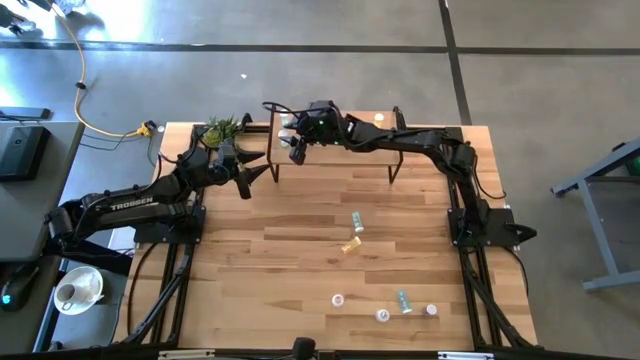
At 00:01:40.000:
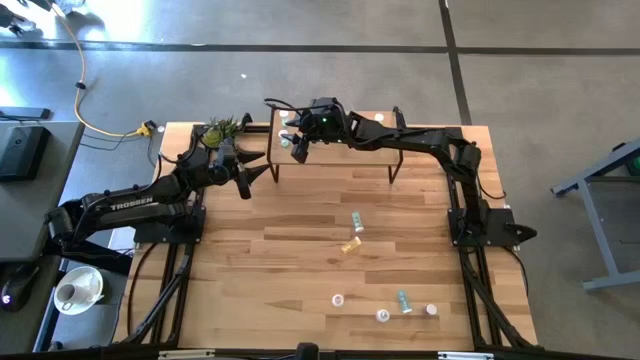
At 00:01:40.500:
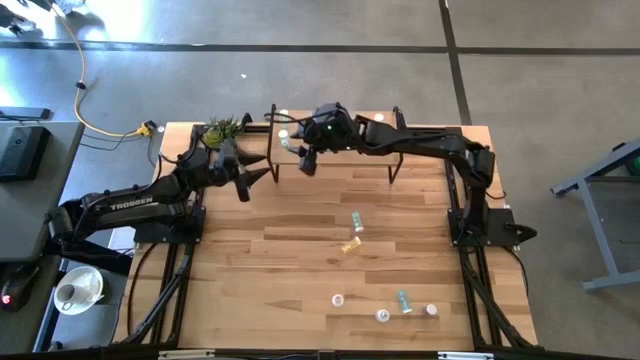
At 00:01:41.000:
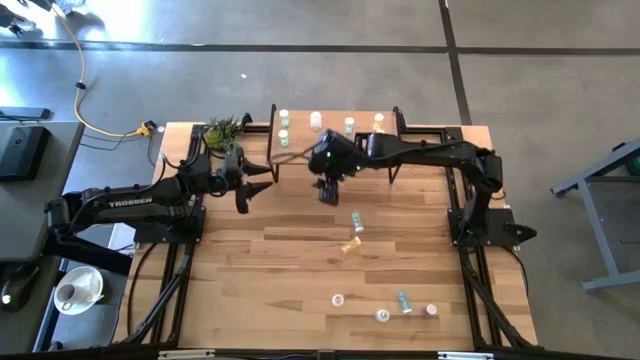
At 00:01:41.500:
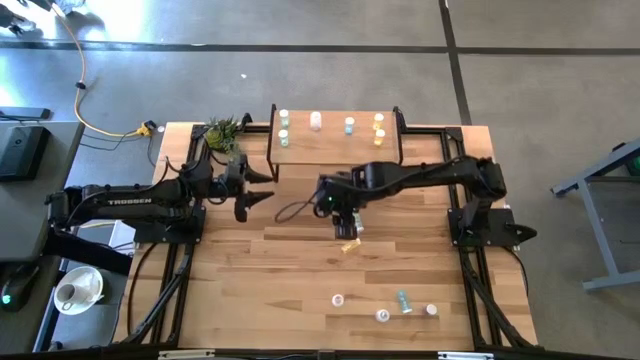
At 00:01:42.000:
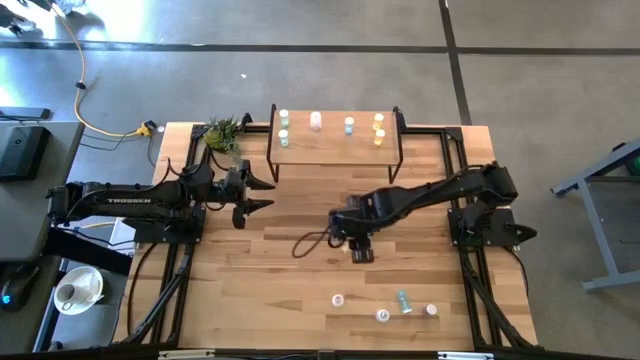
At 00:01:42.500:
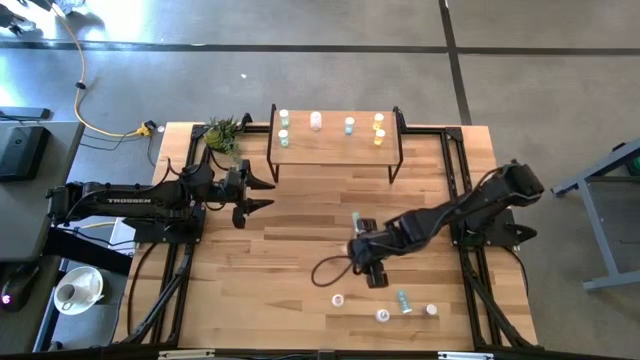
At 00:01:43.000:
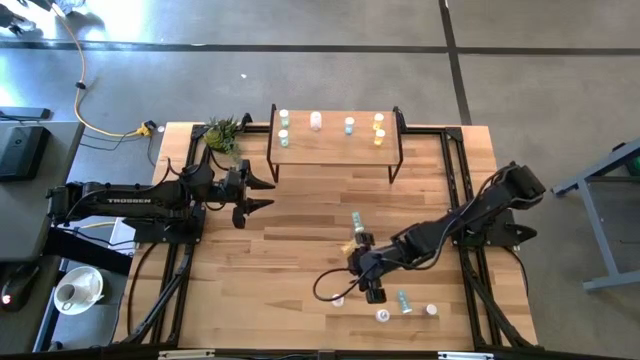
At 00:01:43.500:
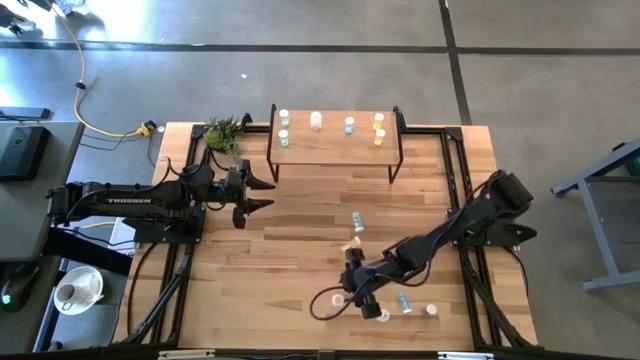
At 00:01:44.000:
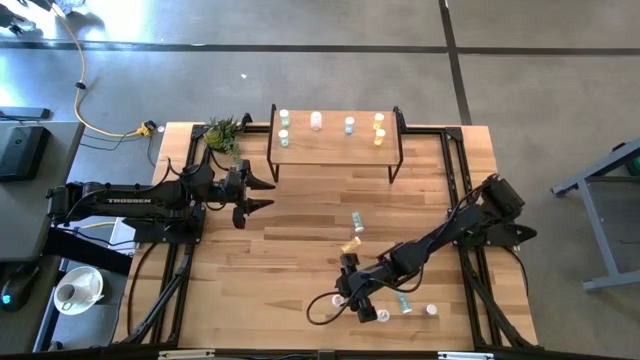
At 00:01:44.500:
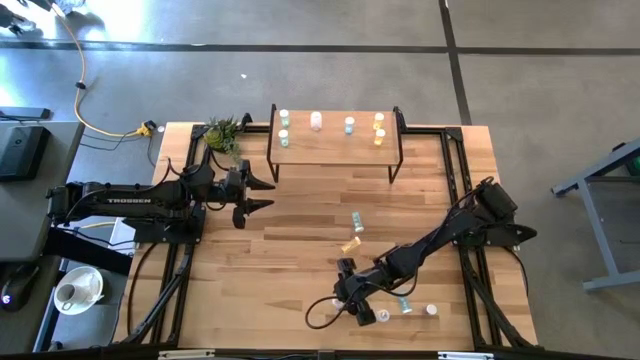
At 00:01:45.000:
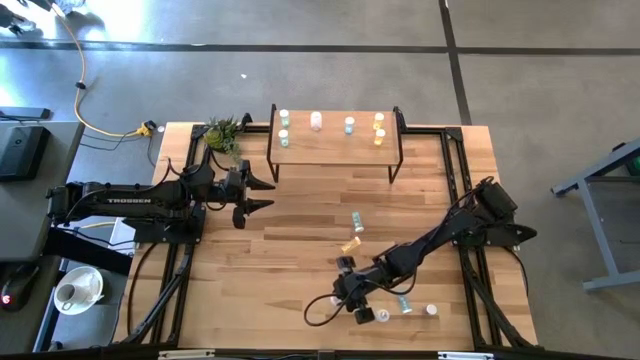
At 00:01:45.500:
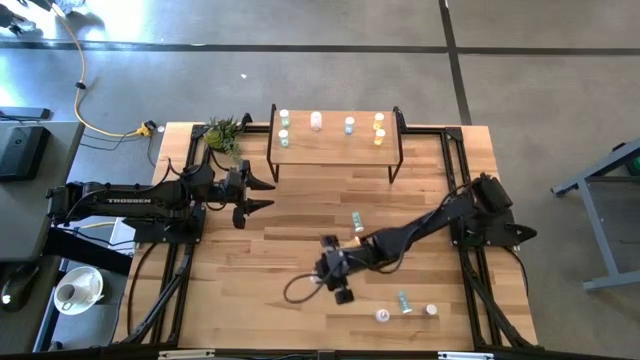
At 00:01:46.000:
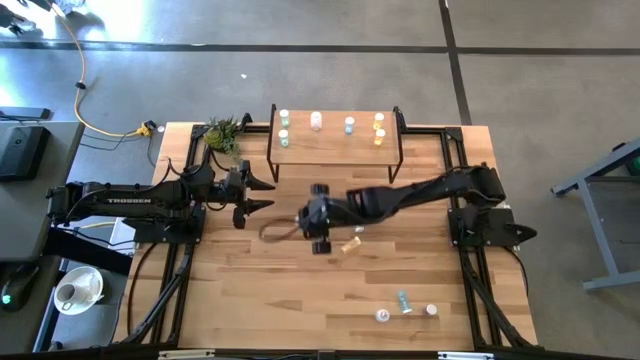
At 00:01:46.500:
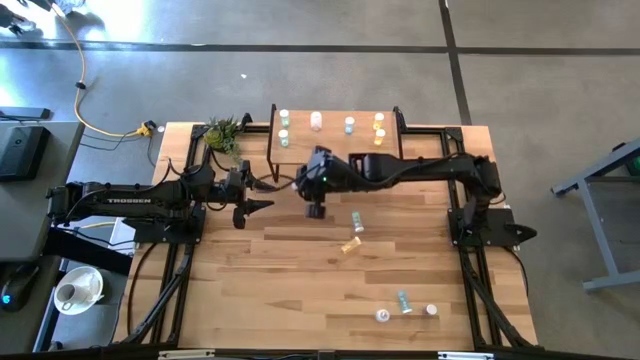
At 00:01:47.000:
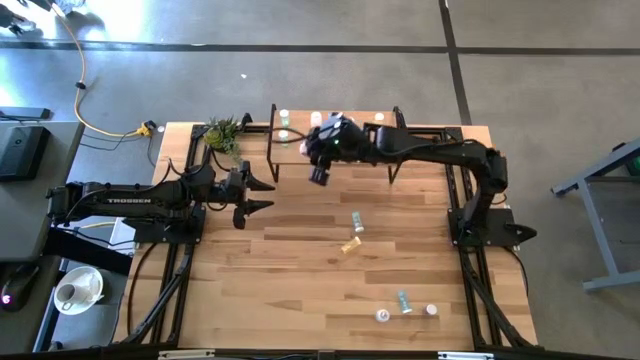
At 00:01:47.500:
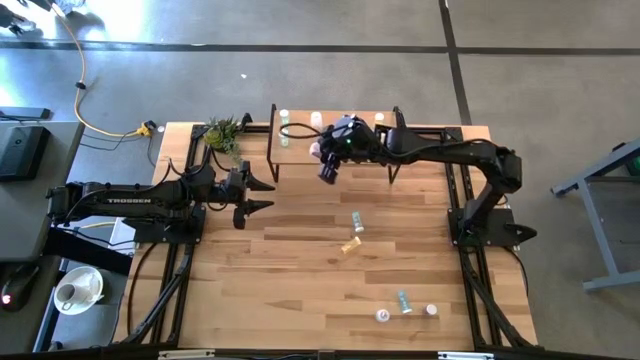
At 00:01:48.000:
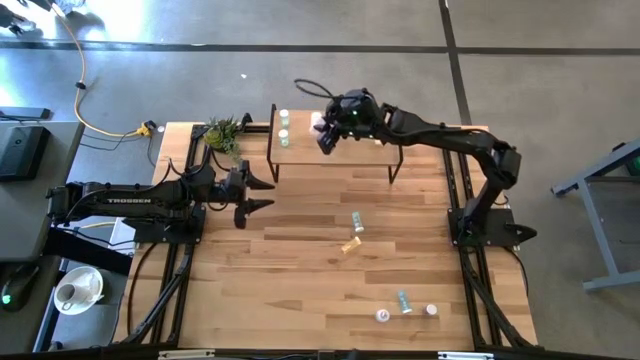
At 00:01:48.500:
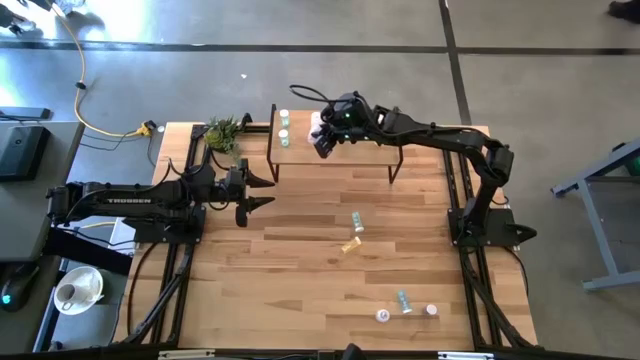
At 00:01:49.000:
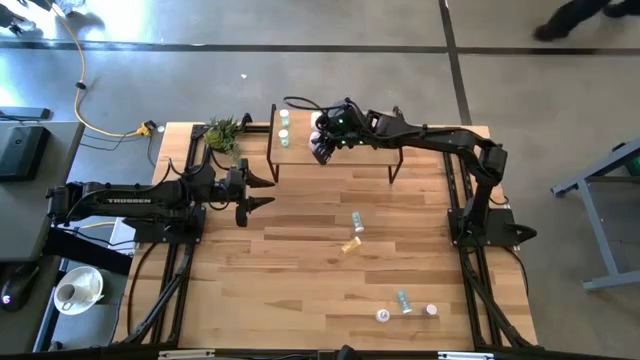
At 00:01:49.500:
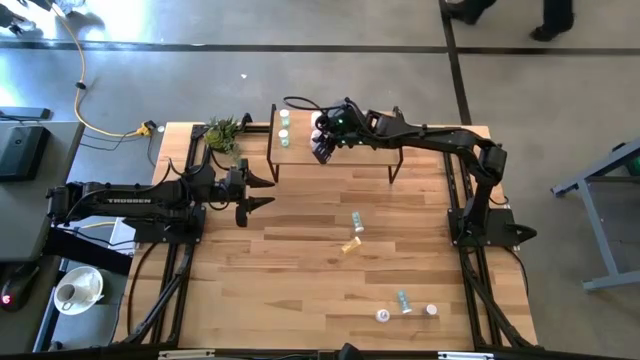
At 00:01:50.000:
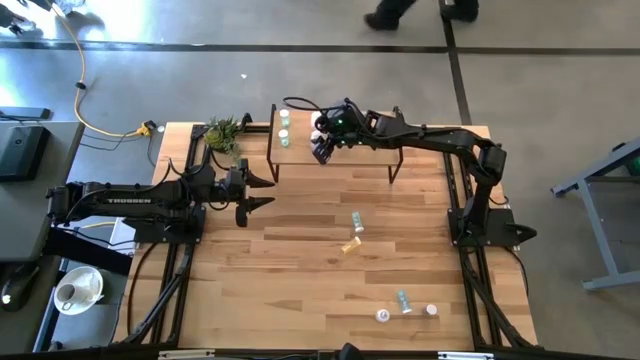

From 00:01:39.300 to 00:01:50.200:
Task: Pick and place medicine bottles onto shelf by color
Put the left transparent pill bottle on the shelf aligned with the other transparent pill bottle

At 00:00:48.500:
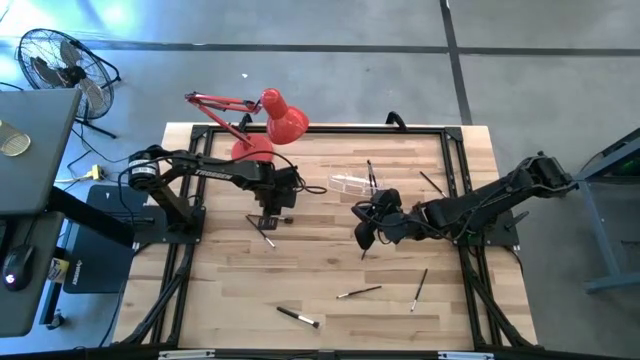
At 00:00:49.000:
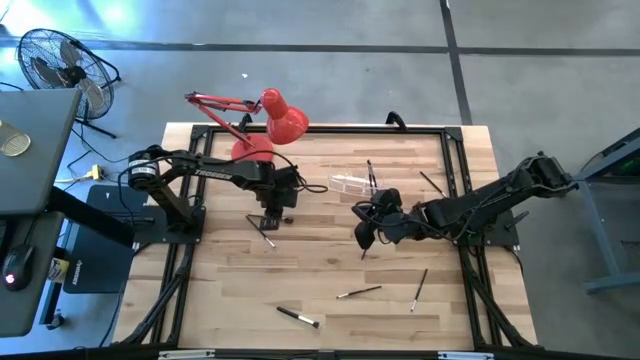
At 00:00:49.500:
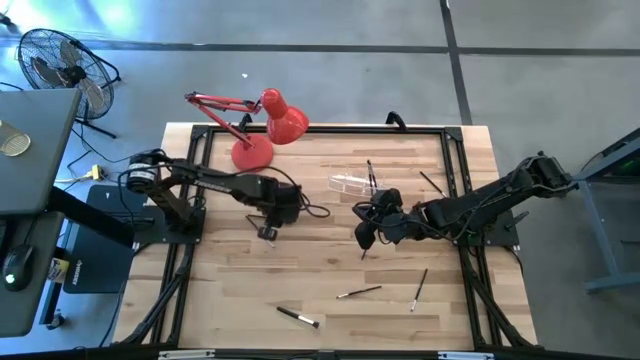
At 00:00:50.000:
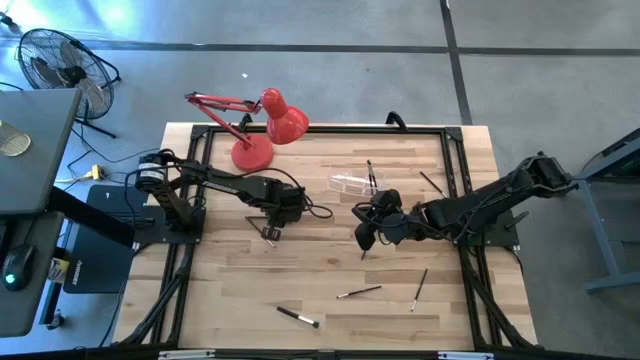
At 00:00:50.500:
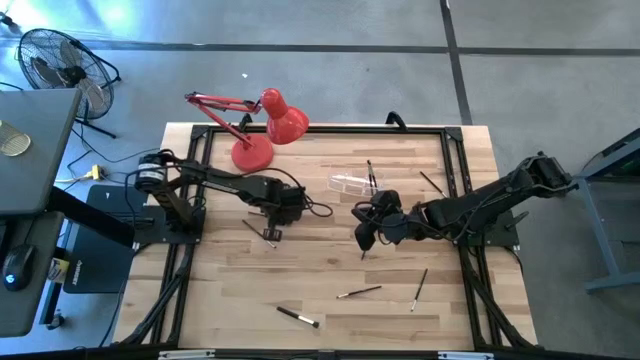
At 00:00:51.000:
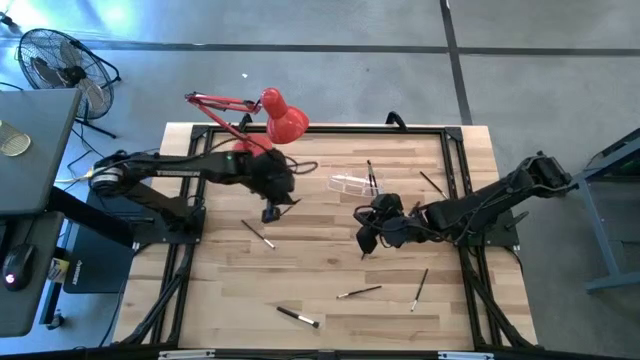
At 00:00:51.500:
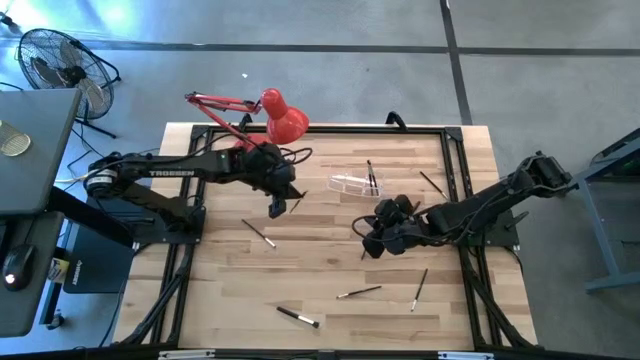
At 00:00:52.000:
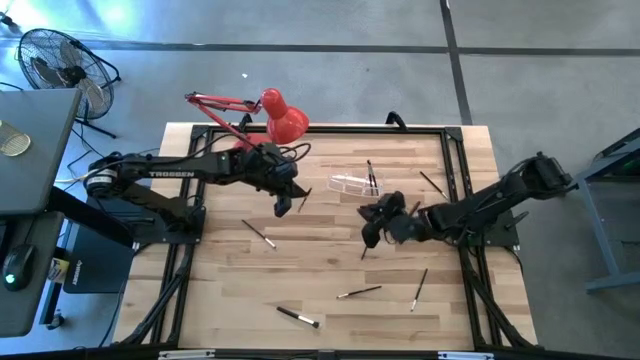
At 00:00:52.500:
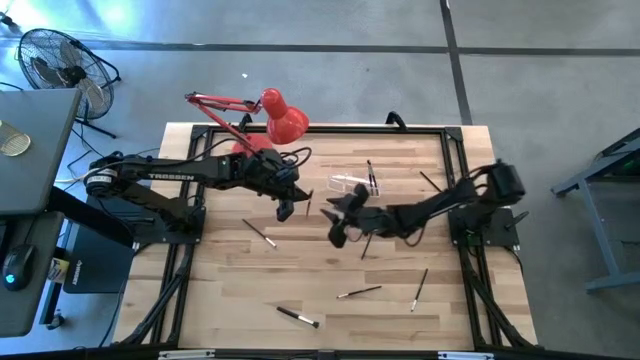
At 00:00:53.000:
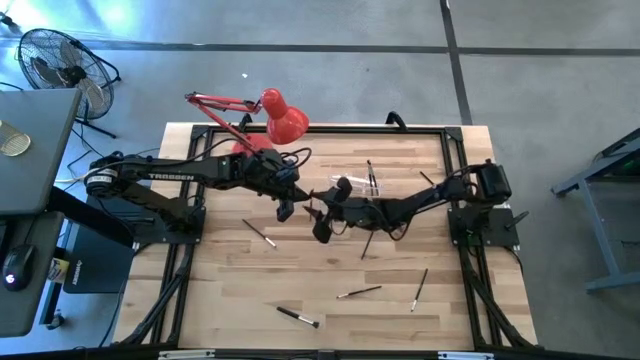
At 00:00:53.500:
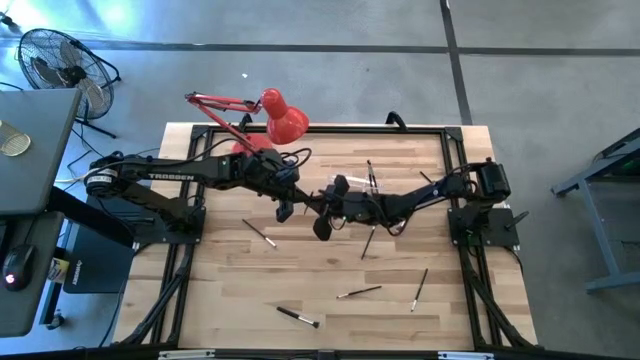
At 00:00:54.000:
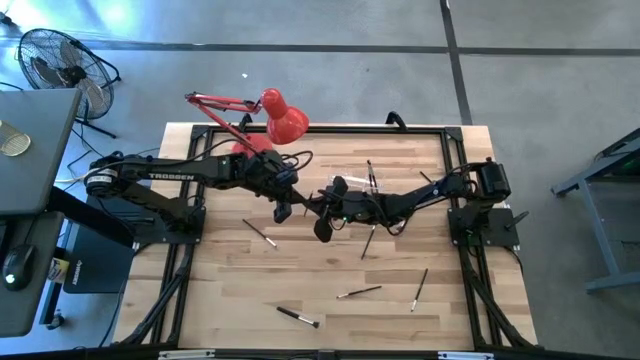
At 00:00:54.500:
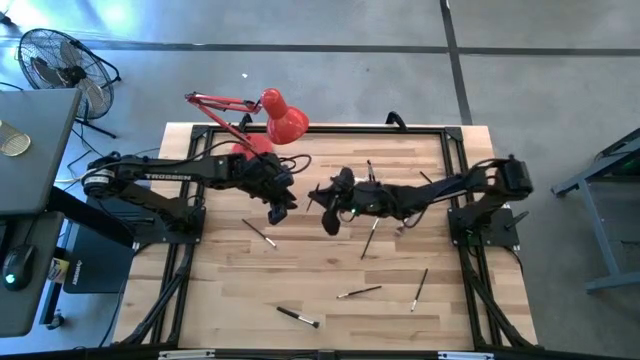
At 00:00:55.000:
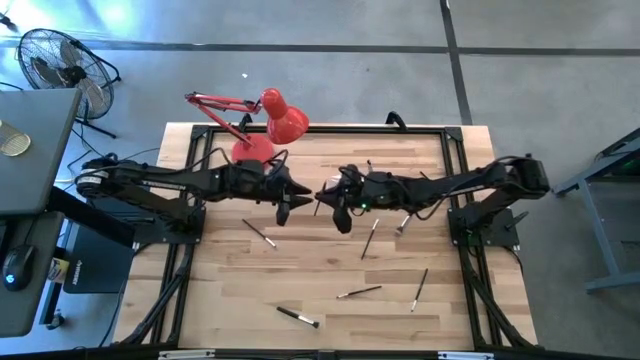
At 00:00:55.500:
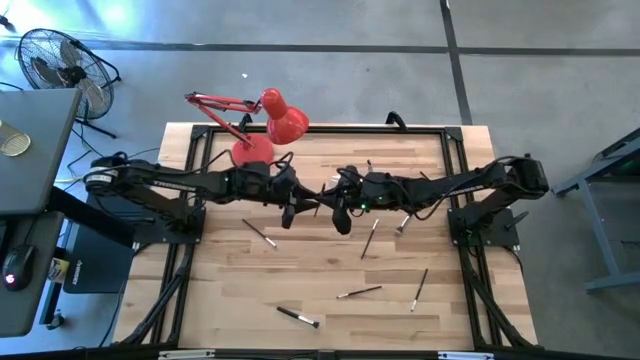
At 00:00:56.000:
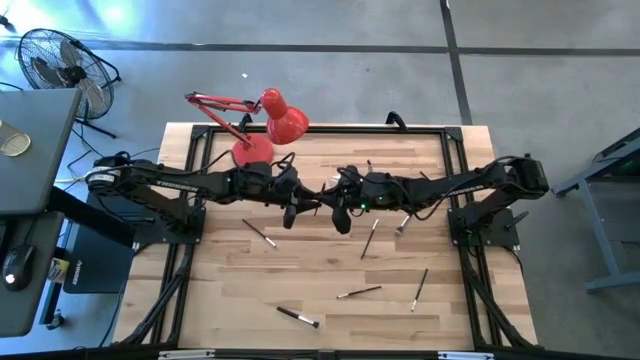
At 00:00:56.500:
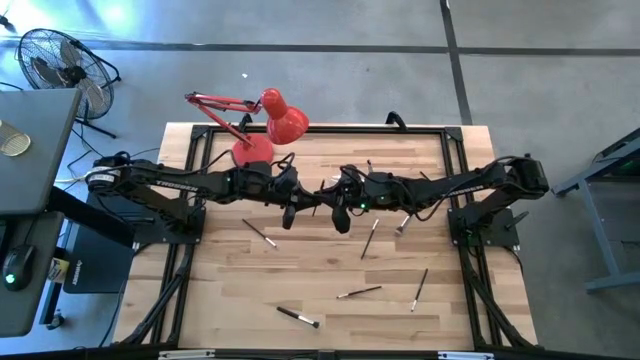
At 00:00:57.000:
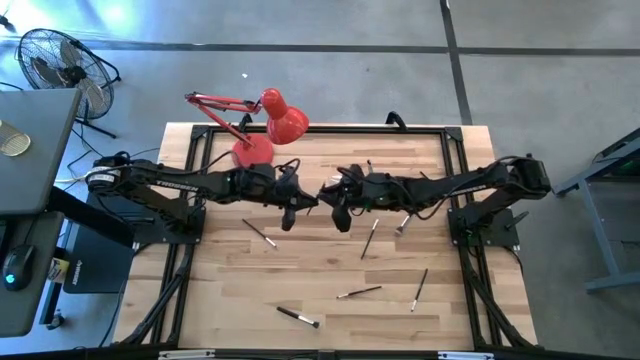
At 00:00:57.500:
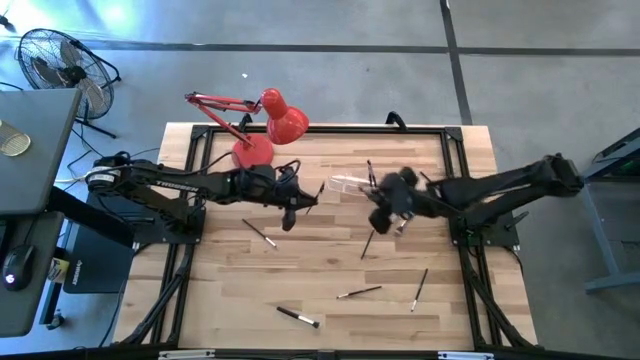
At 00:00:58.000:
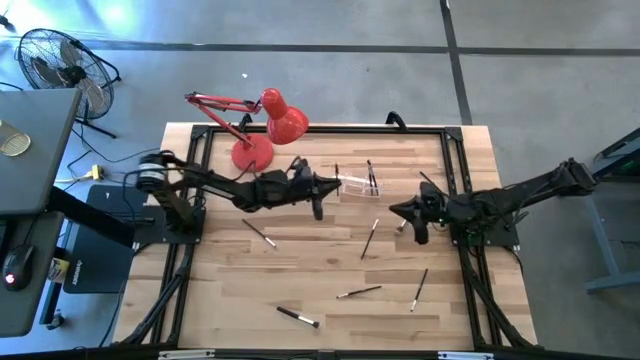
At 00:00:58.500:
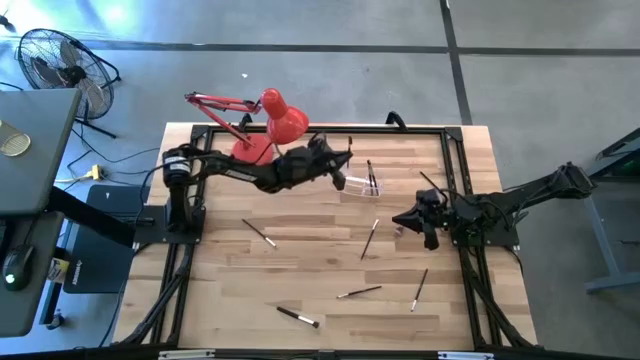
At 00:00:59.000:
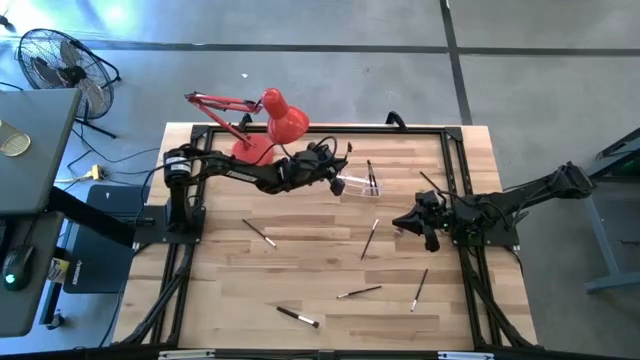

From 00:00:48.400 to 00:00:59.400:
Task: Put items in baskets/containers
Put the brow brush into the transparent organizer
